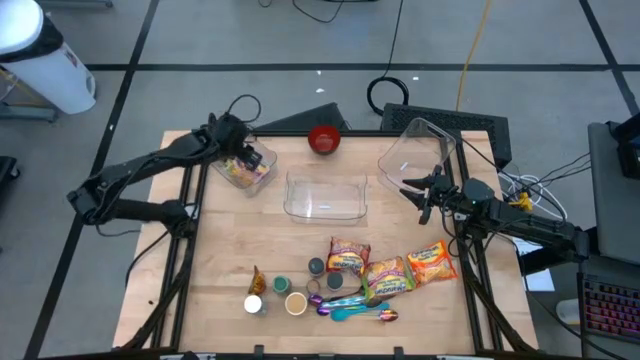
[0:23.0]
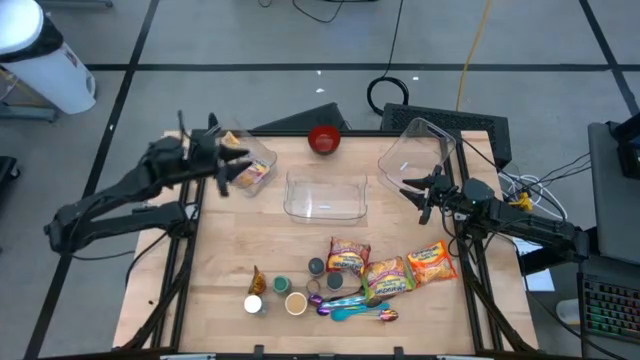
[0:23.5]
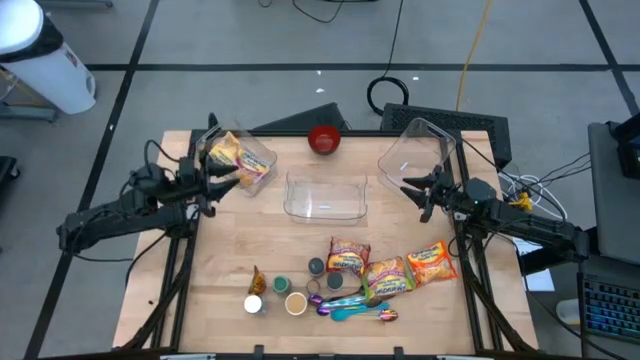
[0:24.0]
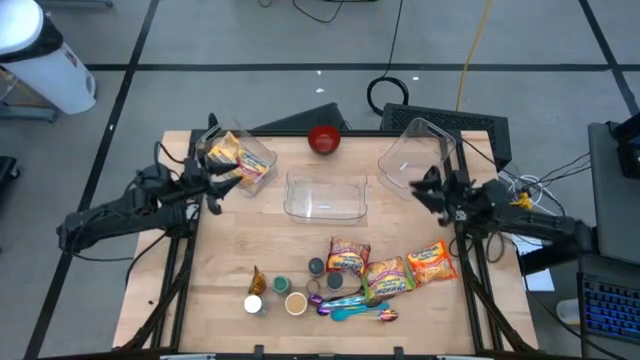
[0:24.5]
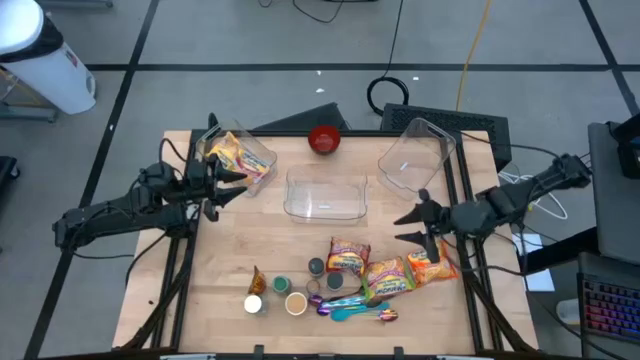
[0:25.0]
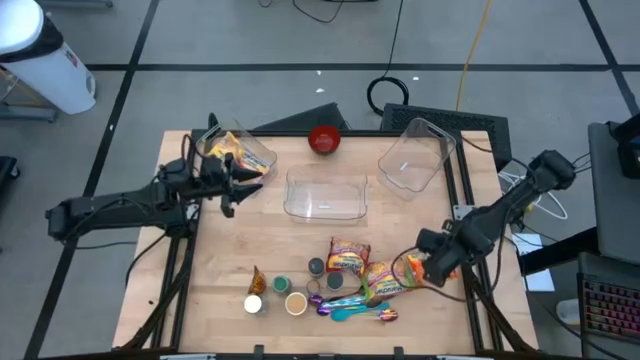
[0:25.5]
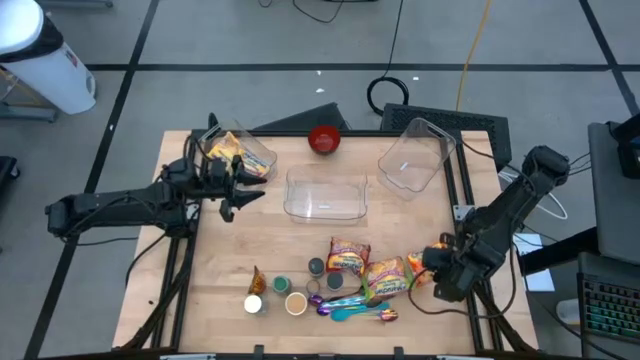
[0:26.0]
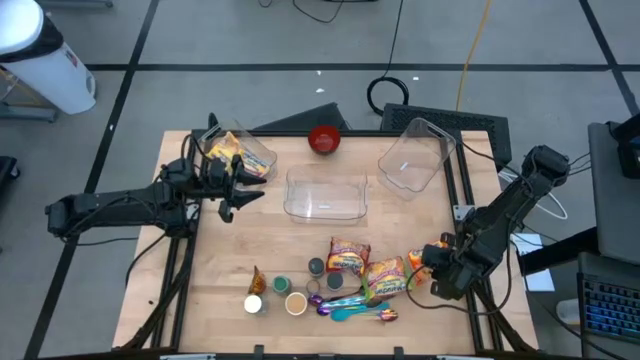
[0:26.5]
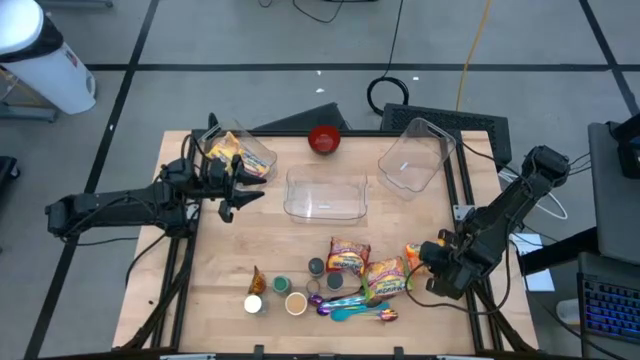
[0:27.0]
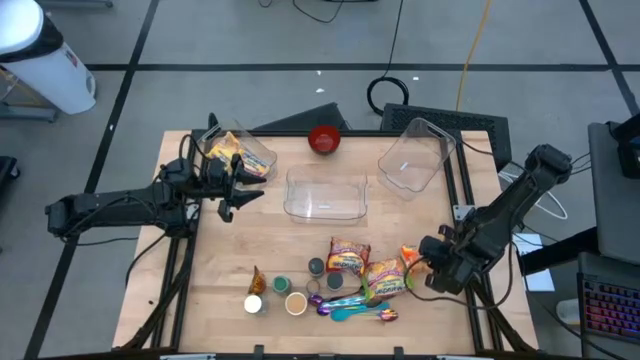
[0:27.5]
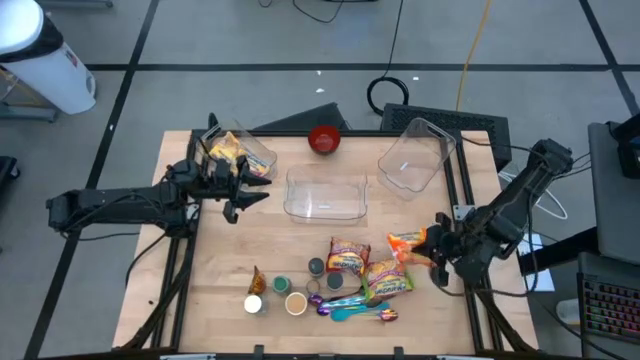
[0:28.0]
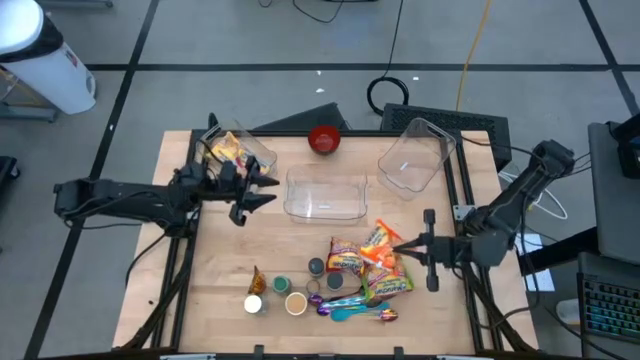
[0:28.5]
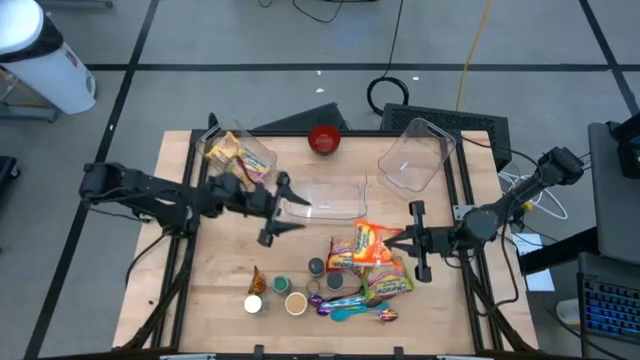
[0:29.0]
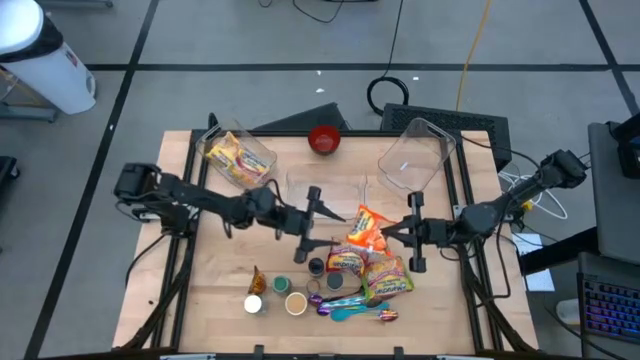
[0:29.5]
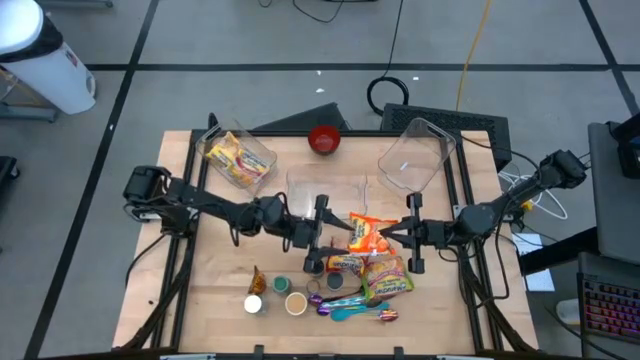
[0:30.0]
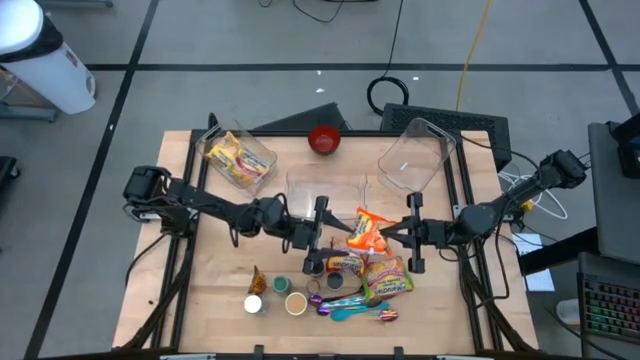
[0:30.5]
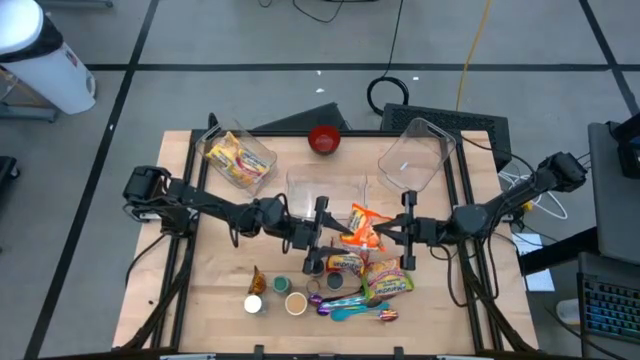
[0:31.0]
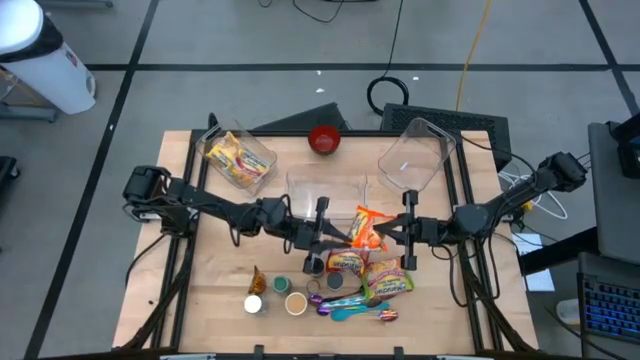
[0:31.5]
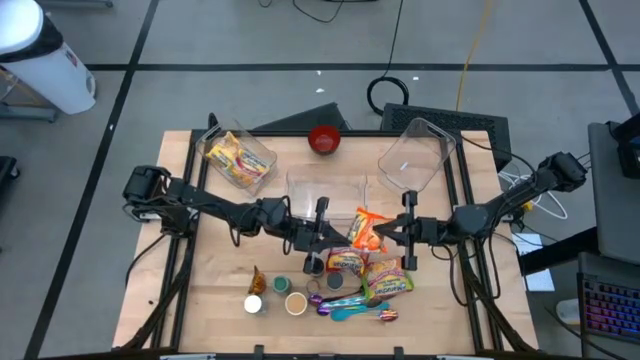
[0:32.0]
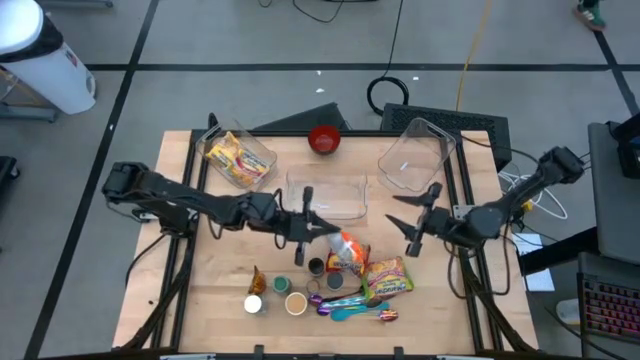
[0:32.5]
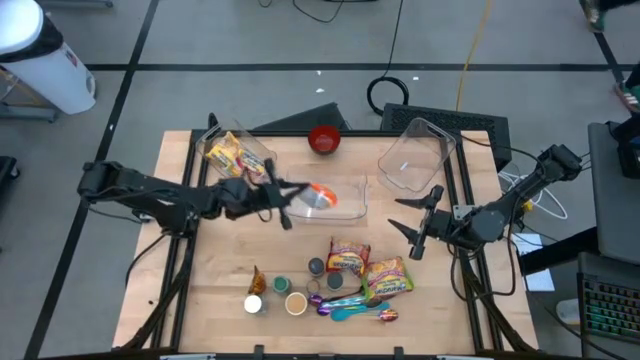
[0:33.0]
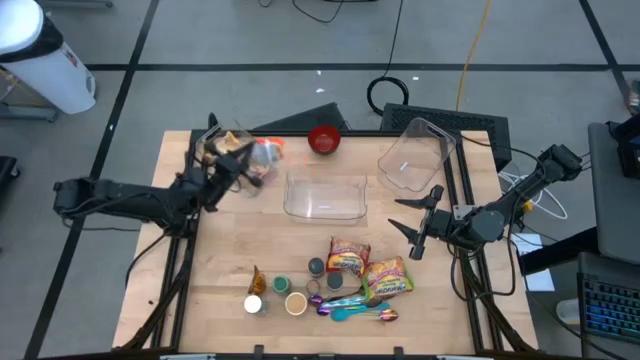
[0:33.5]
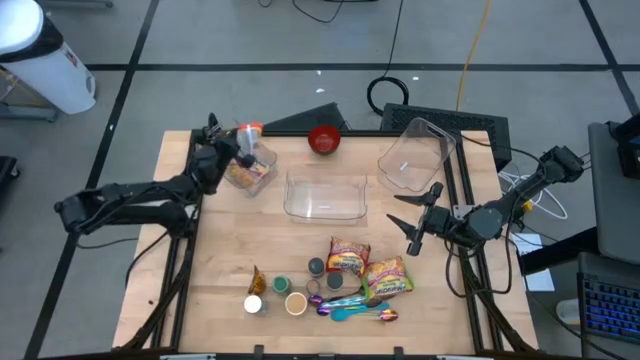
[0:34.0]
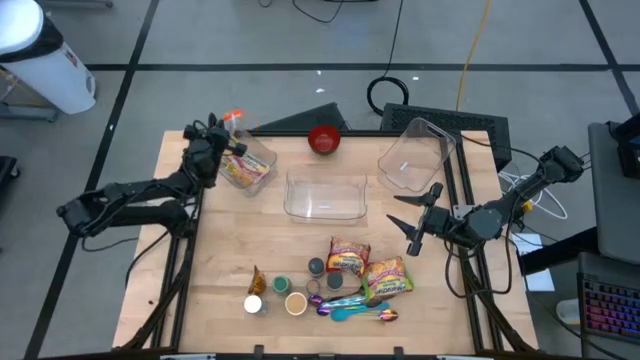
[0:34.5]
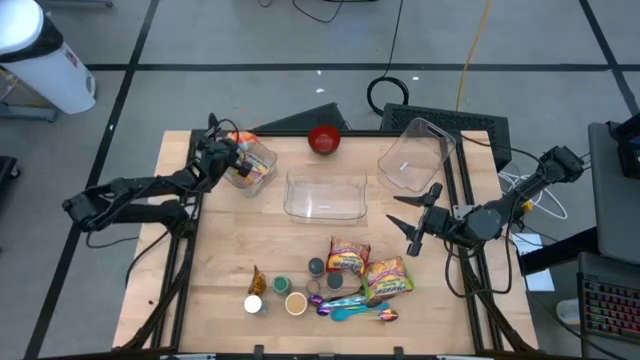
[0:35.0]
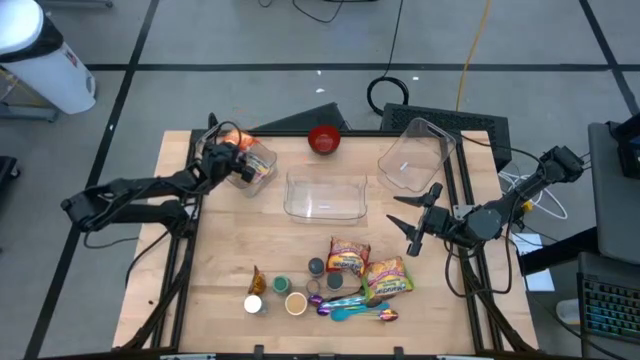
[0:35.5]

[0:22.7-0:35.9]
Task: Pick & Place Food Item
Put the orange noodle pack into the left transparent bin

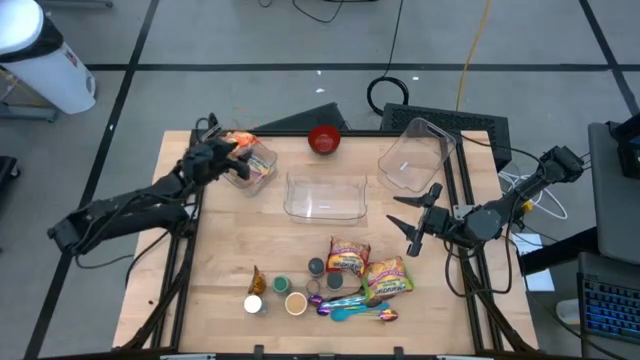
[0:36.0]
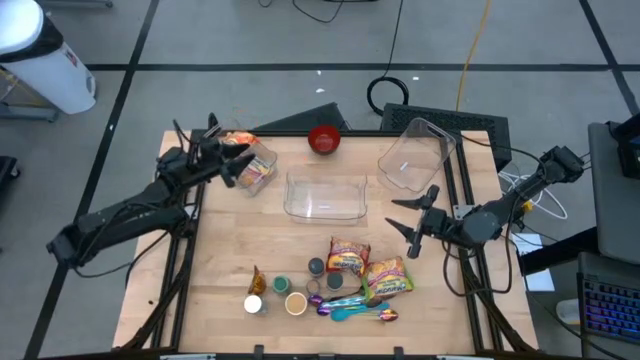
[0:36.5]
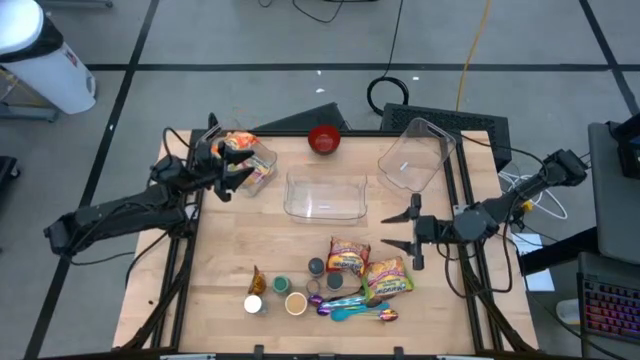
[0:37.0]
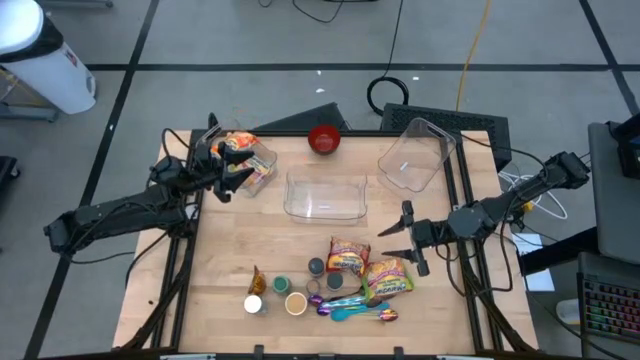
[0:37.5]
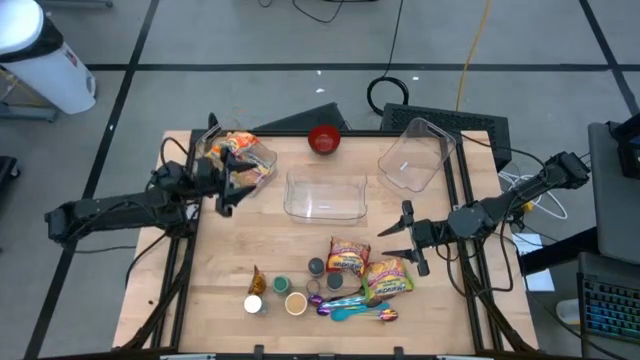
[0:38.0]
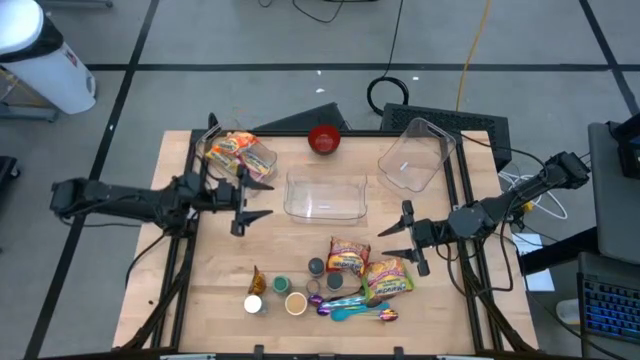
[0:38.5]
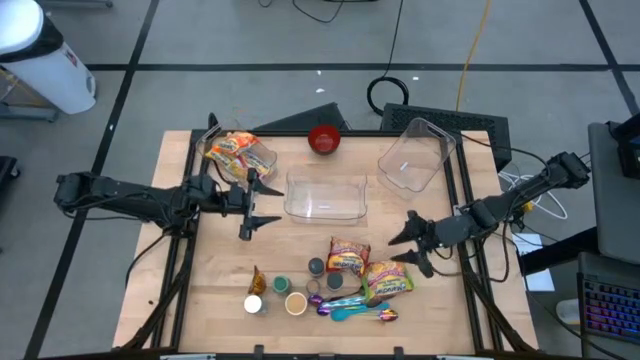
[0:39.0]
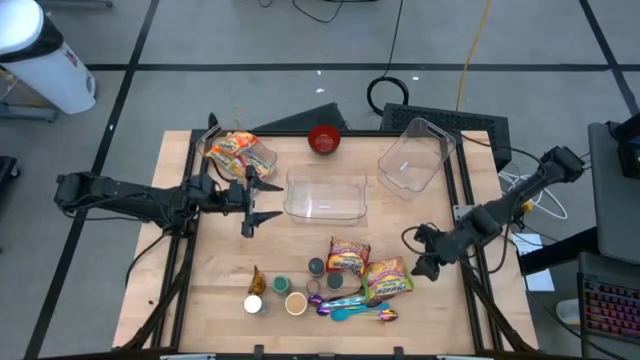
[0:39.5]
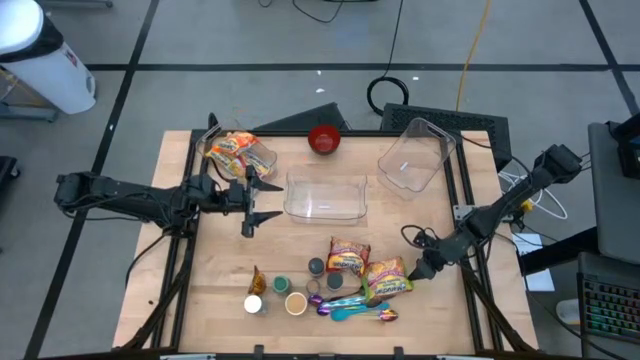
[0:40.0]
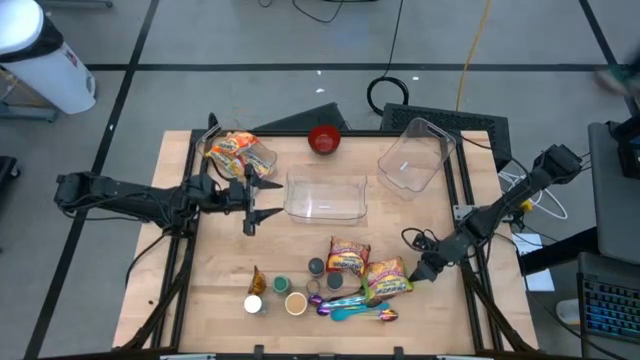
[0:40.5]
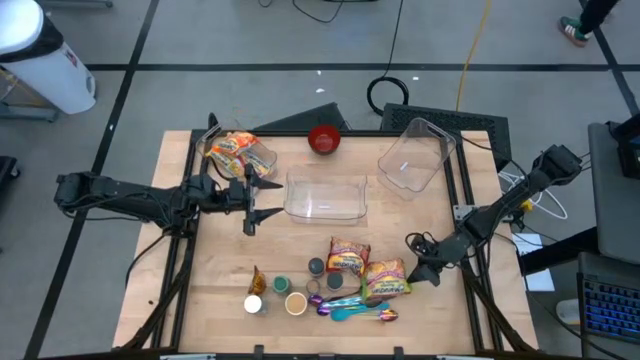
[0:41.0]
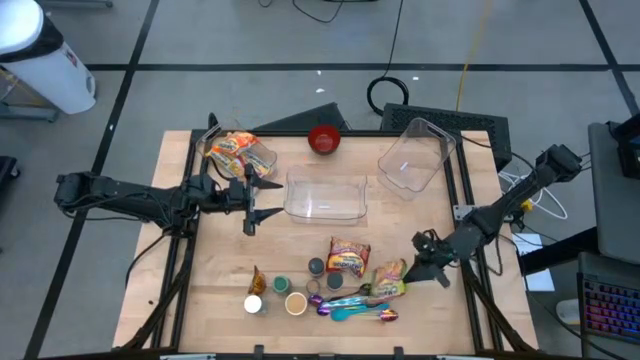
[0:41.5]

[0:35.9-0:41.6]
Put the green noodle pack into the left transparent bin

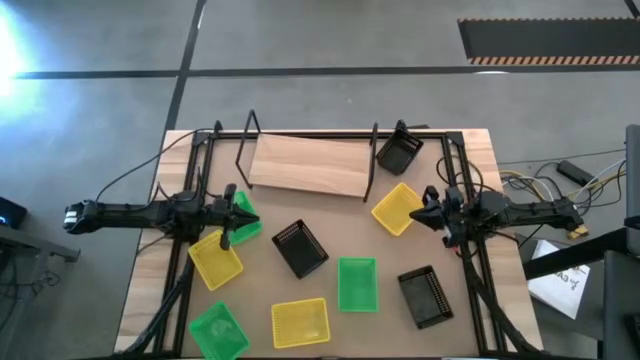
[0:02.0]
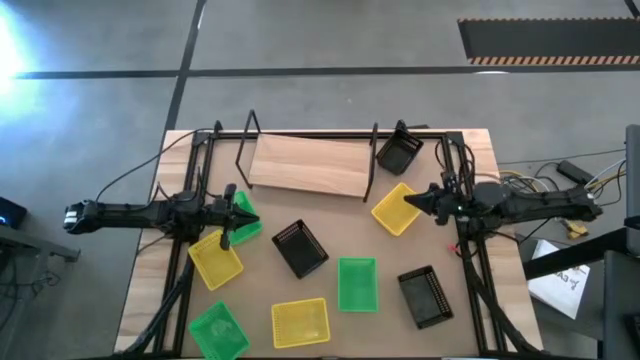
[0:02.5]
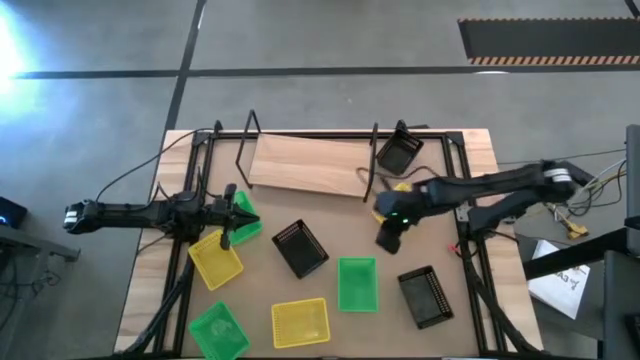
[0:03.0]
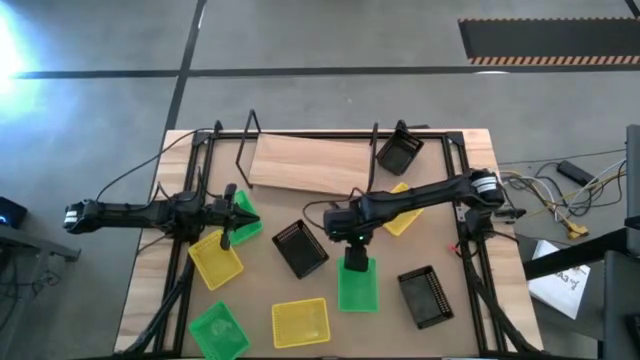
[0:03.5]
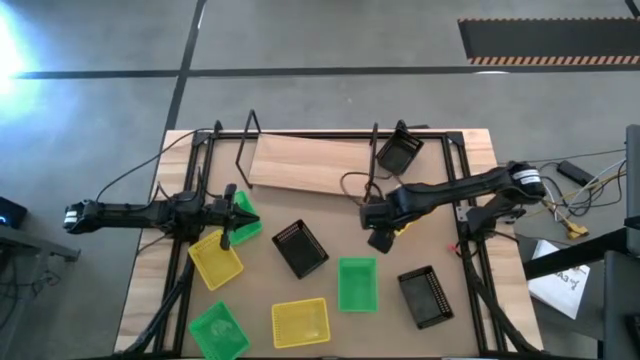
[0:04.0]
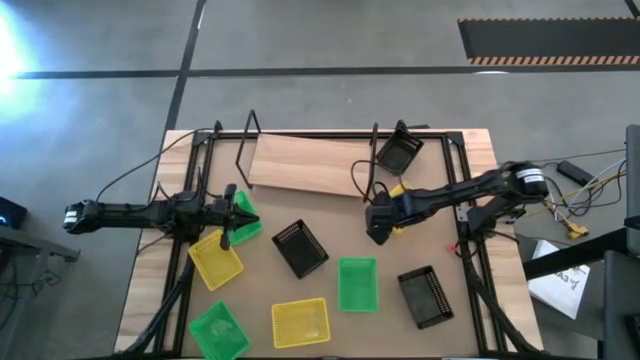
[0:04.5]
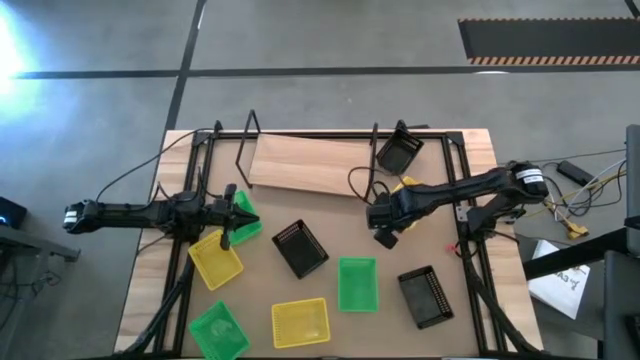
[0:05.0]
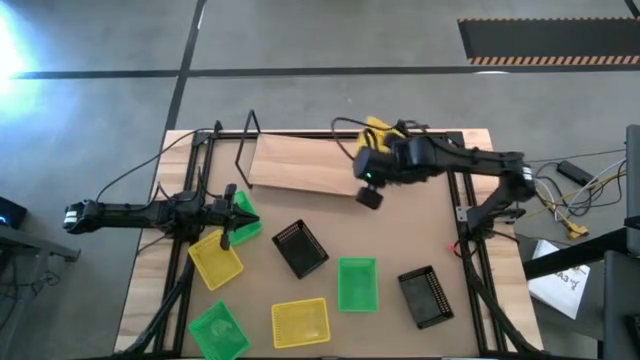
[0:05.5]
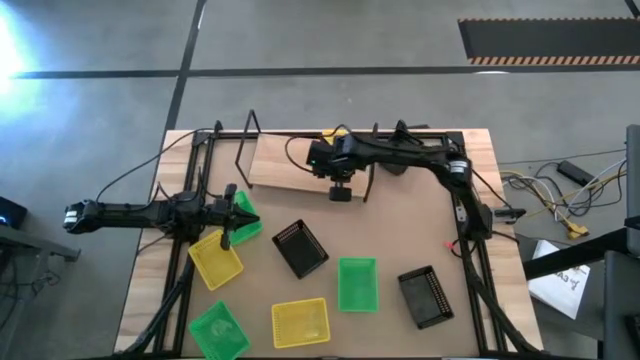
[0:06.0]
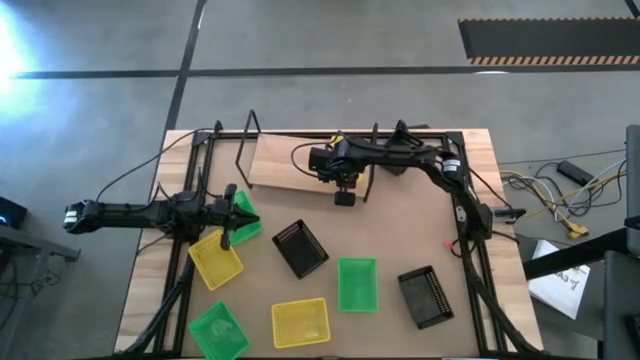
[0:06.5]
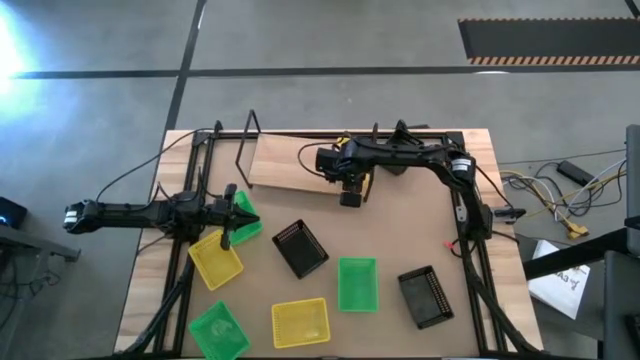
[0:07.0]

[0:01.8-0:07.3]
Task: Stack baskets on shelf by color
Put the right yellow basket on the shelf
